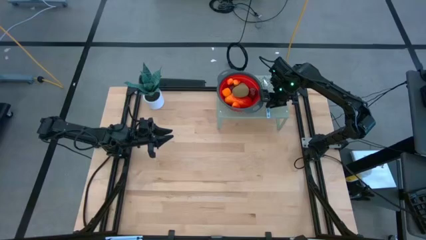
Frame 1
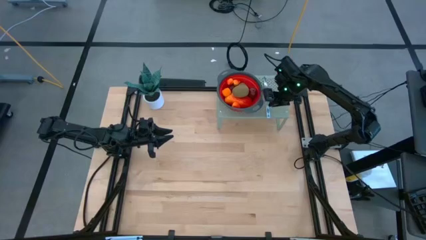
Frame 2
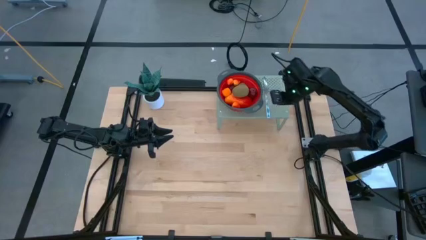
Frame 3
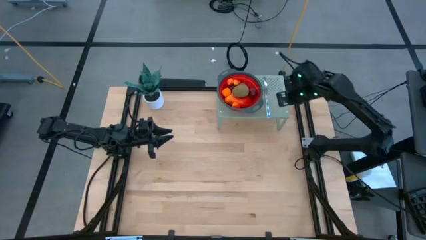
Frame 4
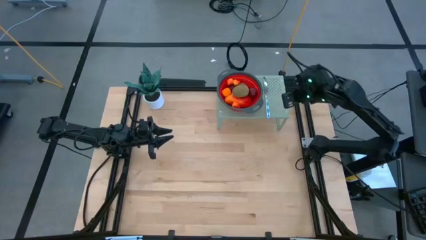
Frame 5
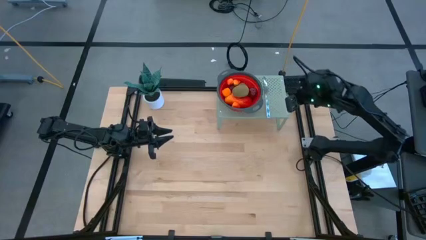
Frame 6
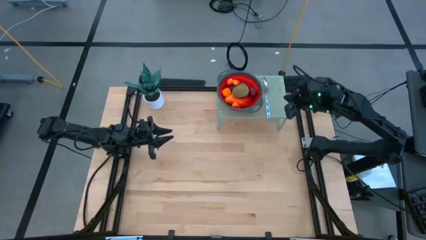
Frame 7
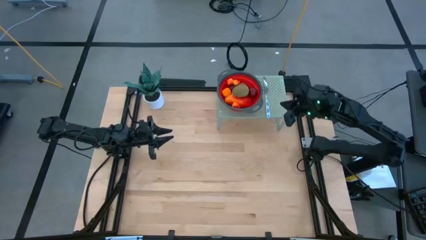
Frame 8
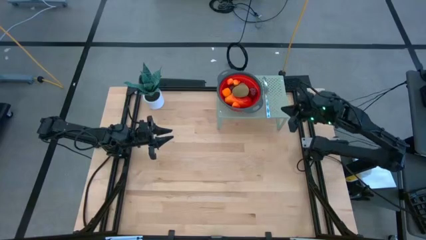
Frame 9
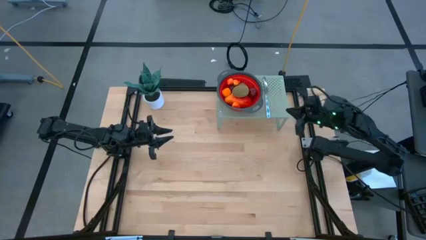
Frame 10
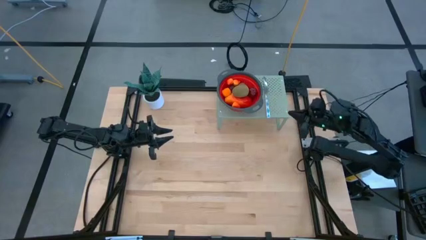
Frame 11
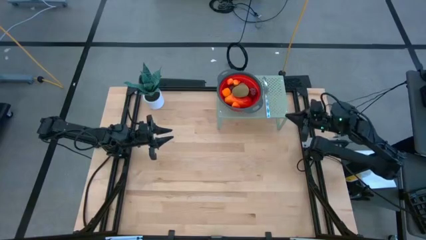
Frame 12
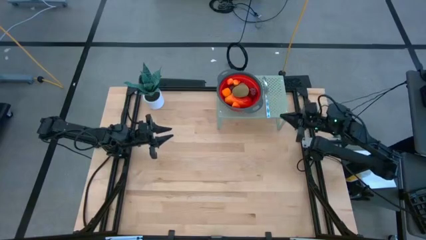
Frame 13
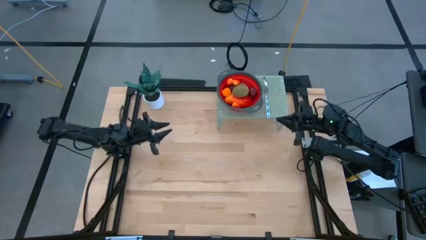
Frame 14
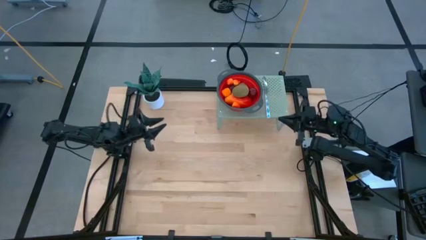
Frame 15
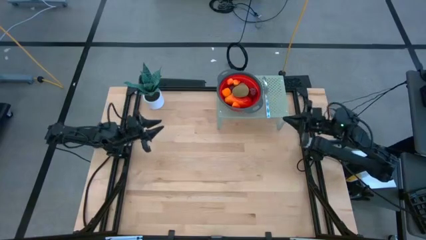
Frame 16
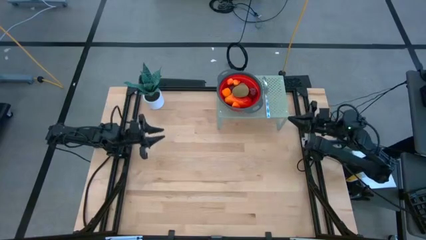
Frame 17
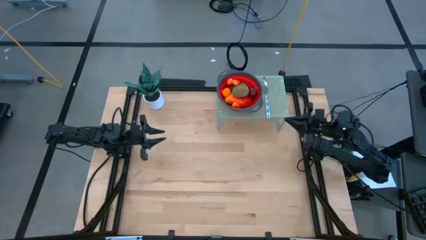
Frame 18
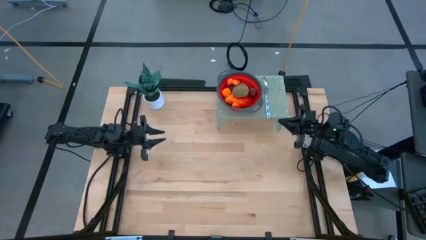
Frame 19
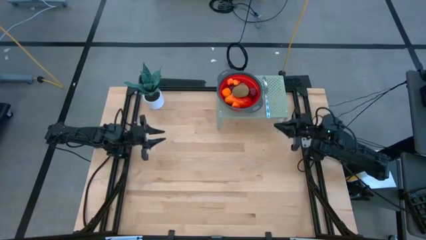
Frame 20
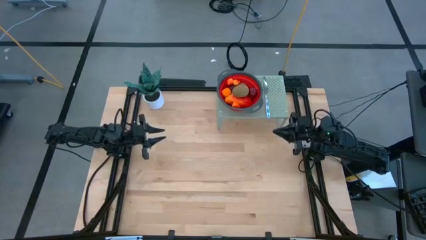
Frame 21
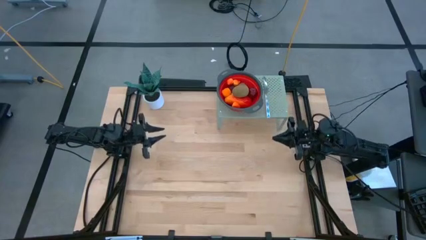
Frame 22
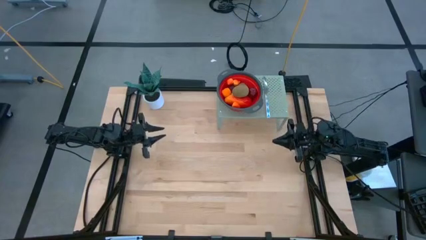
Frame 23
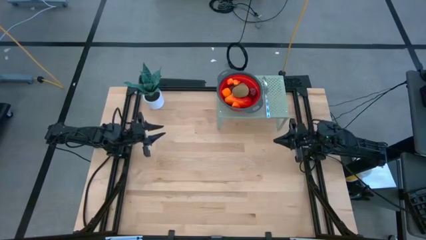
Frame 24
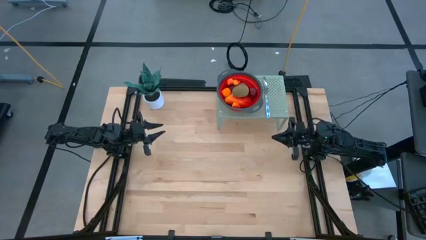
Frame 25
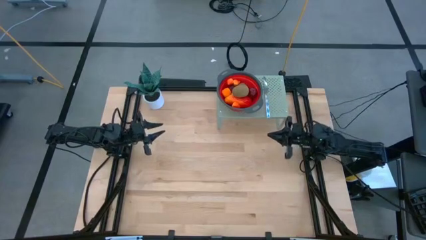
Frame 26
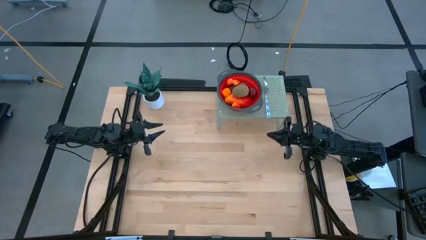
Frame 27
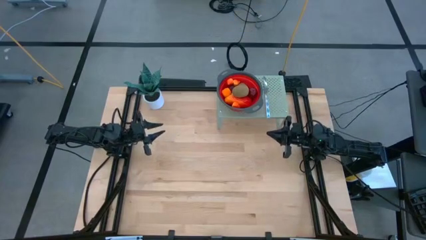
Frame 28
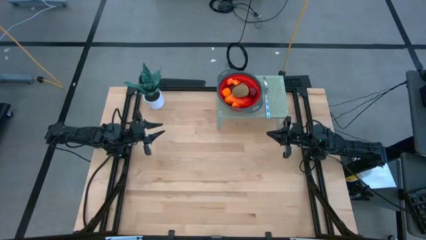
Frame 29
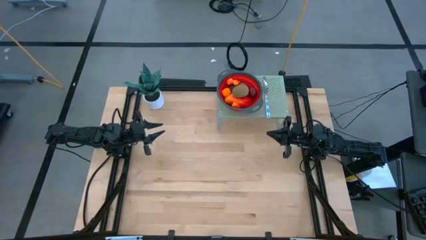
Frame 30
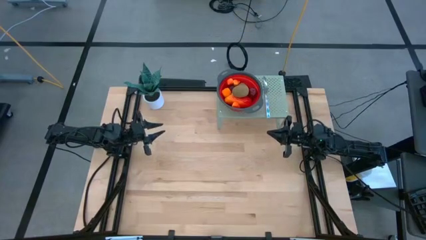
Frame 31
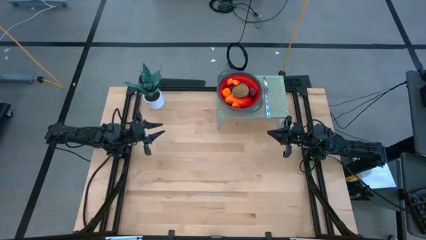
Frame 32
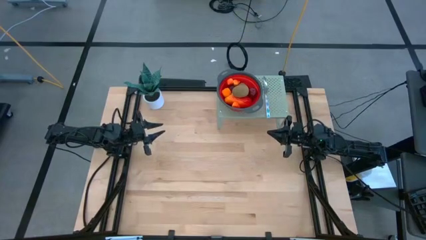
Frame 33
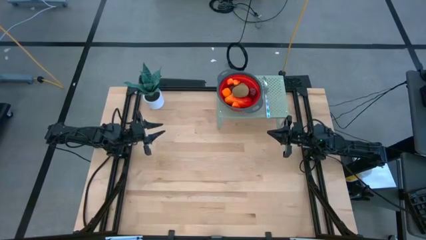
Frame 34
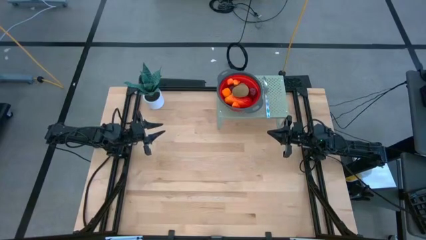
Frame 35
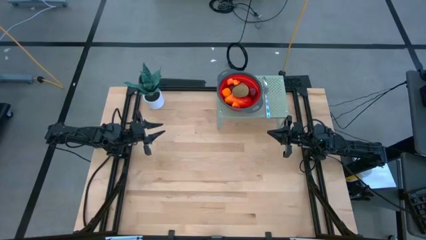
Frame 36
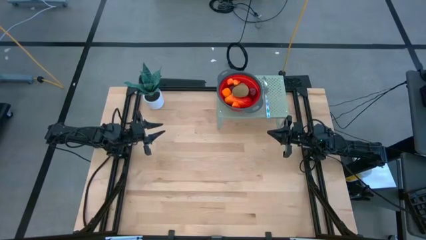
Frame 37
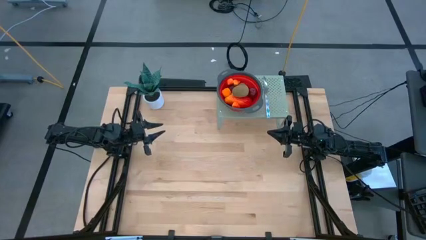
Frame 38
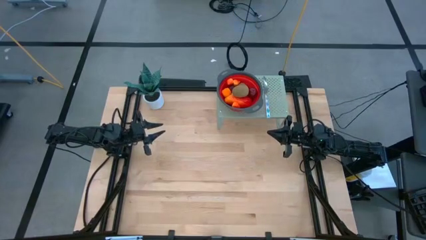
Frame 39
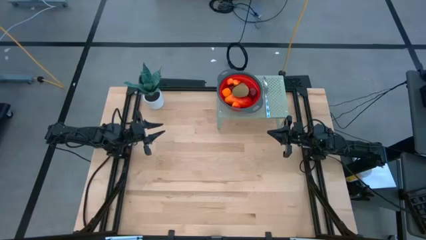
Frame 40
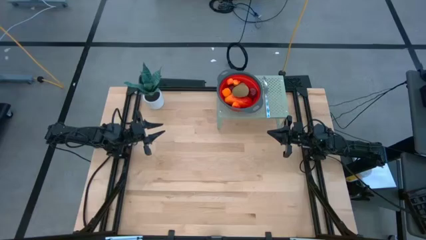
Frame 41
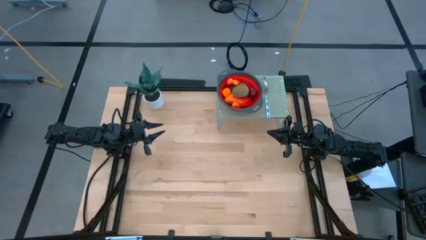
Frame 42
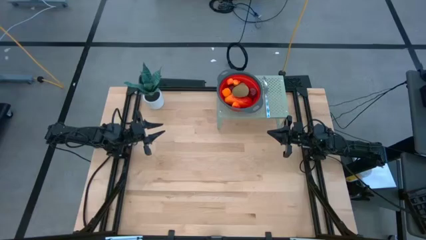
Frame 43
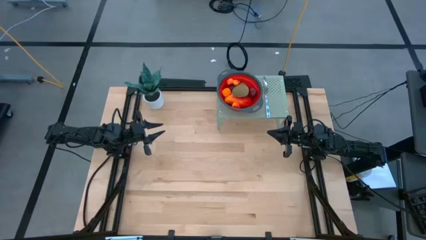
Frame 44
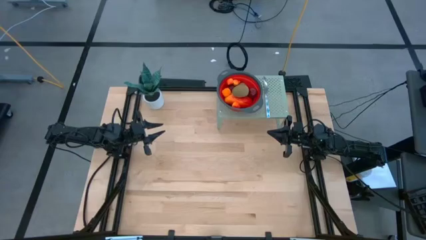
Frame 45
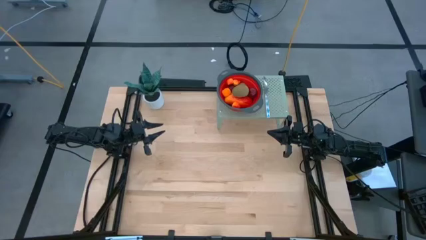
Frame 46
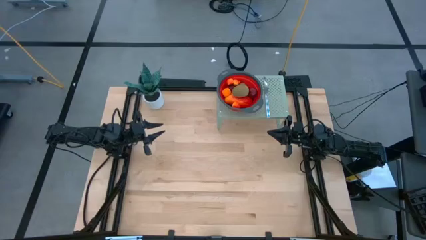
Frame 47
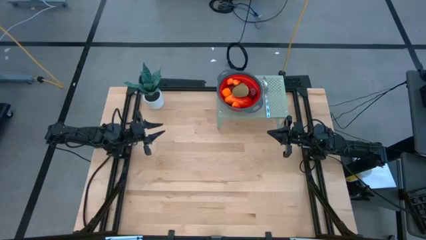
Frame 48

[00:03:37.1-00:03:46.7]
Task: Pick & Place Fruit
Return to Home Position

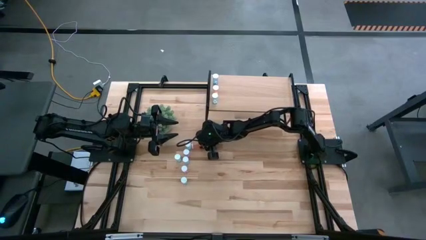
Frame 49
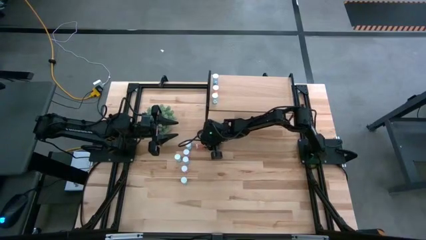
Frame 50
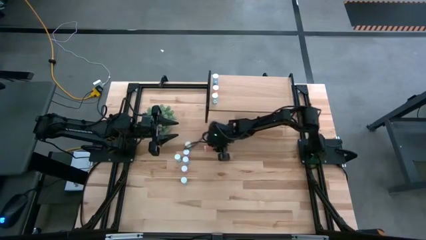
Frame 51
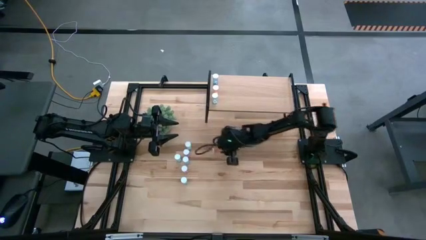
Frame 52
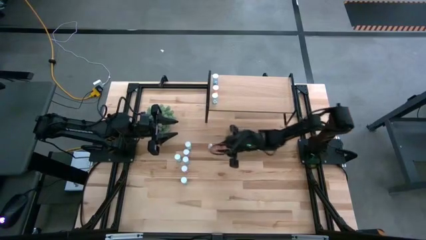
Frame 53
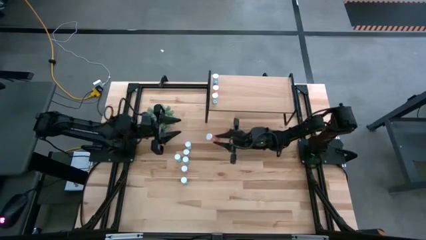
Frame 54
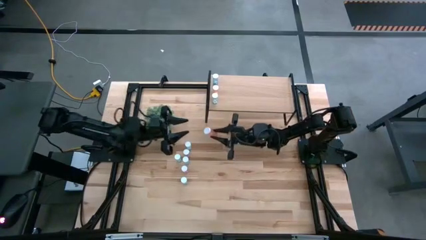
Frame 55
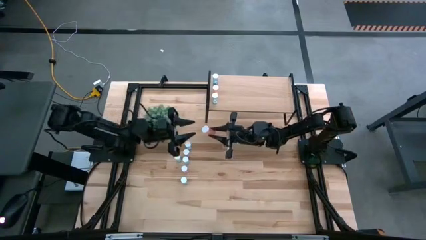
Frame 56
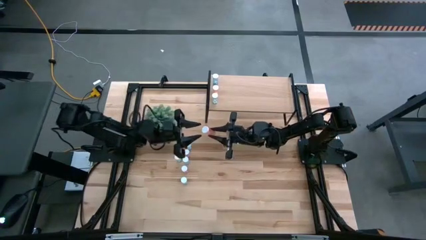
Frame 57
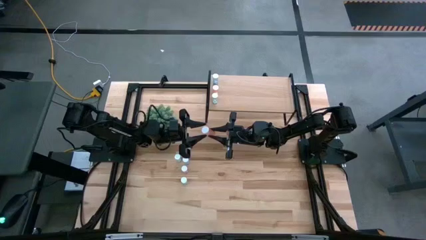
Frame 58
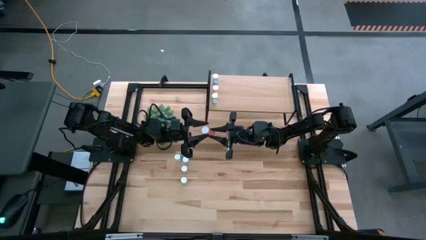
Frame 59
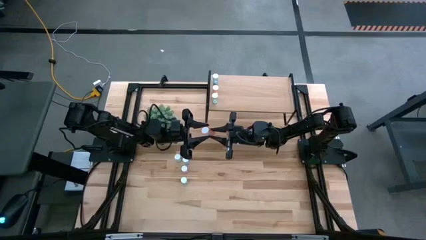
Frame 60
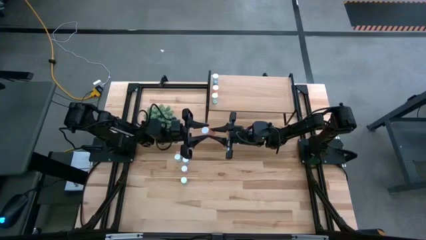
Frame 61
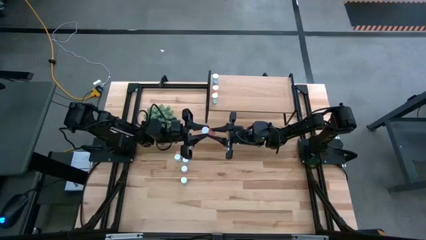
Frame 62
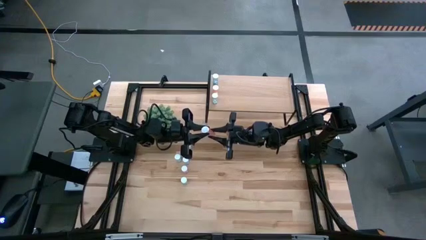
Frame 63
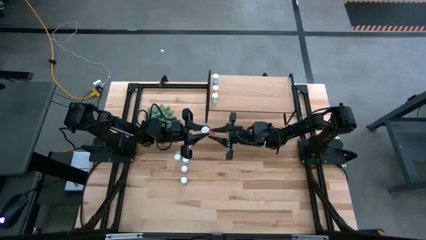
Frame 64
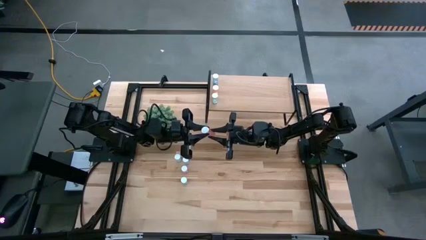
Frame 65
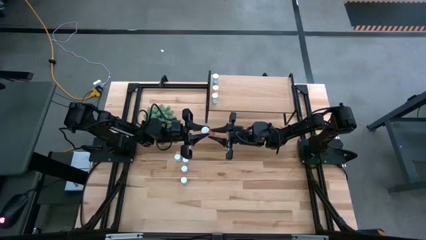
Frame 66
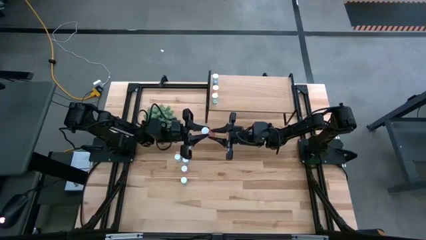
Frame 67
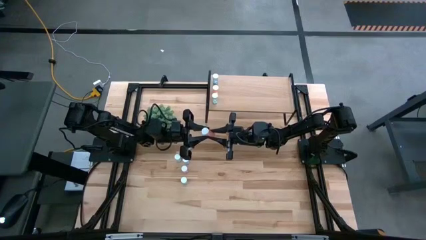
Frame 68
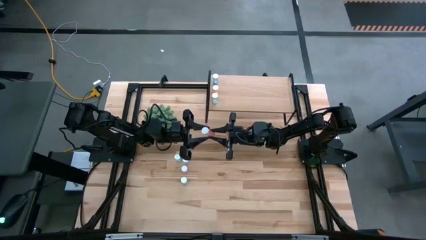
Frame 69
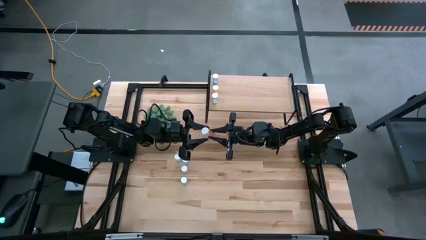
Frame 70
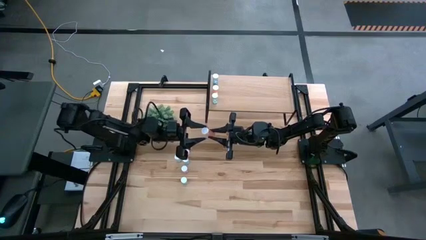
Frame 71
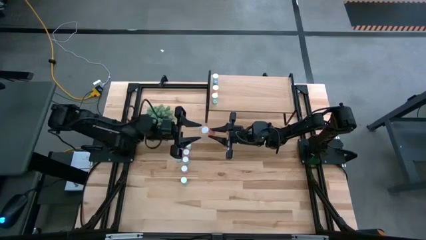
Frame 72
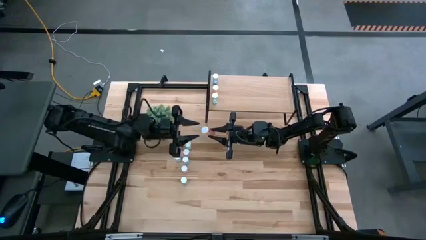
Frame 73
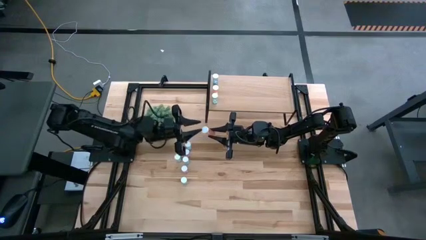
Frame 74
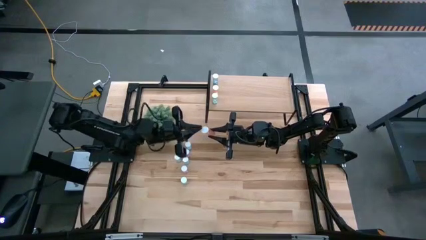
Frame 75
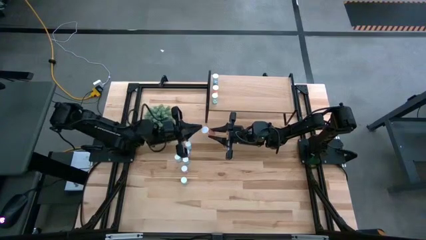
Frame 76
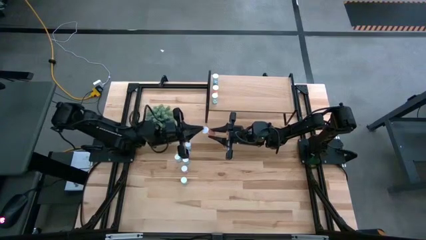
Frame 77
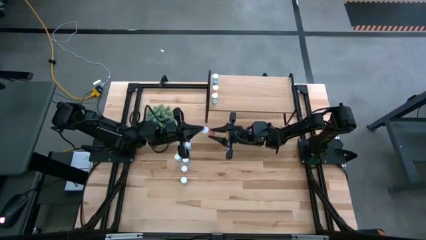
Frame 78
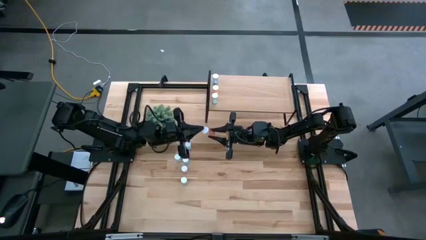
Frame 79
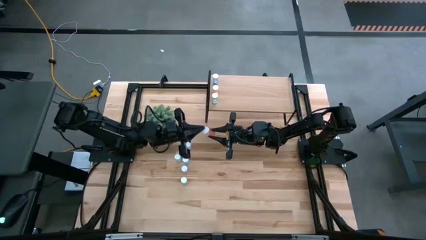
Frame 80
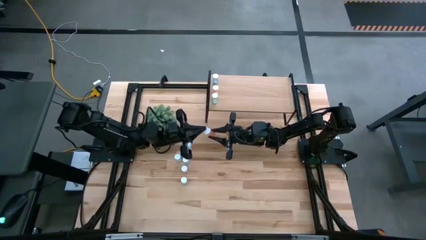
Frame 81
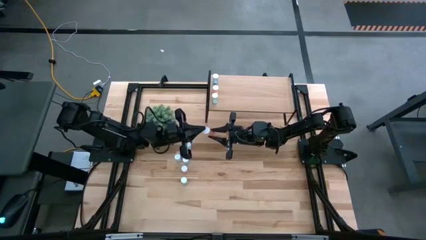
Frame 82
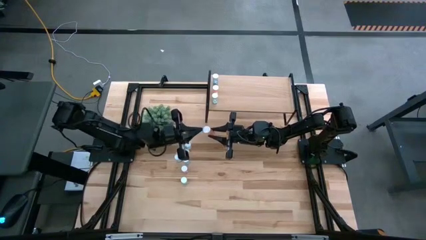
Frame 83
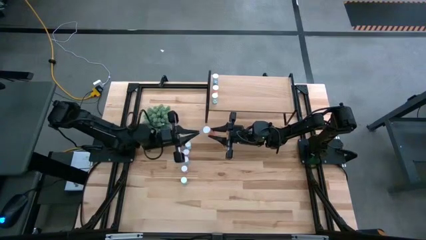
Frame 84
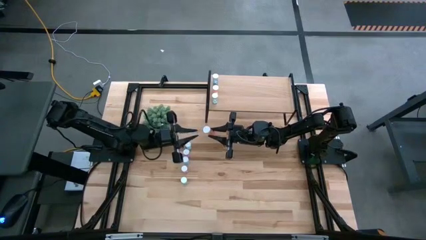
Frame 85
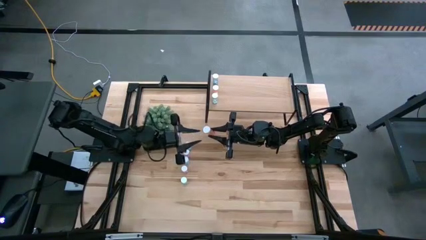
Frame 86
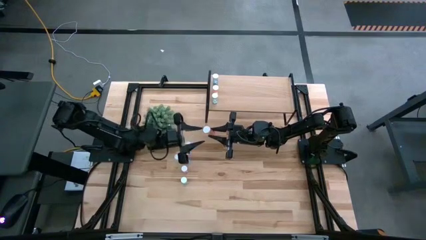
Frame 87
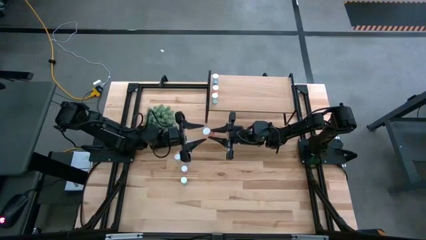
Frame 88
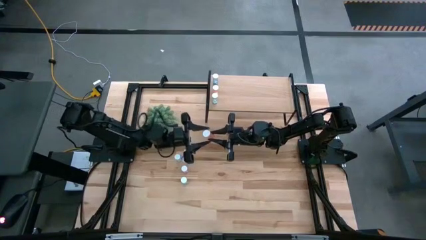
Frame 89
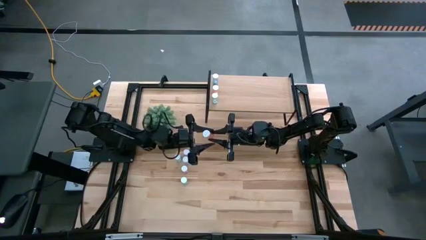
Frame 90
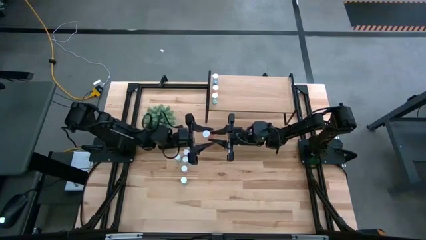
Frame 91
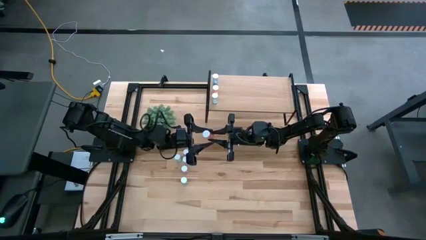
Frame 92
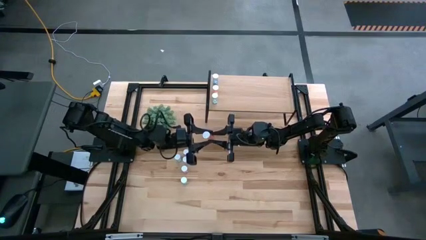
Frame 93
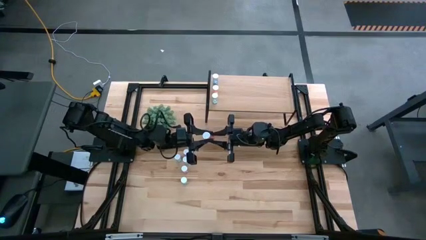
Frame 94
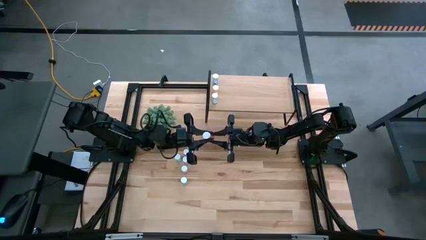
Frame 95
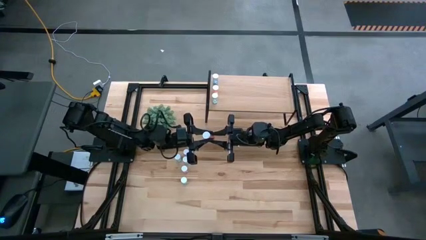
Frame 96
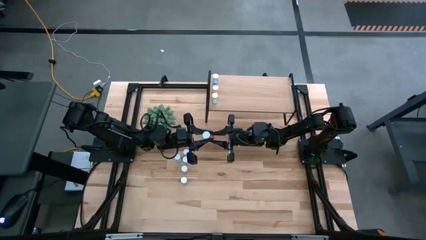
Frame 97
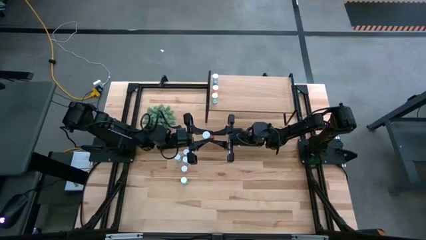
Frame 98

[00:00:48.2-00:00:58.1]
Task: Pick and place medicine bottles onto shelf by color
Put the transparent orange medicine bottle on the shelf
